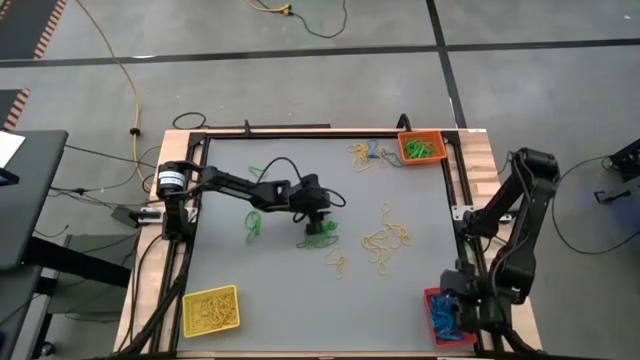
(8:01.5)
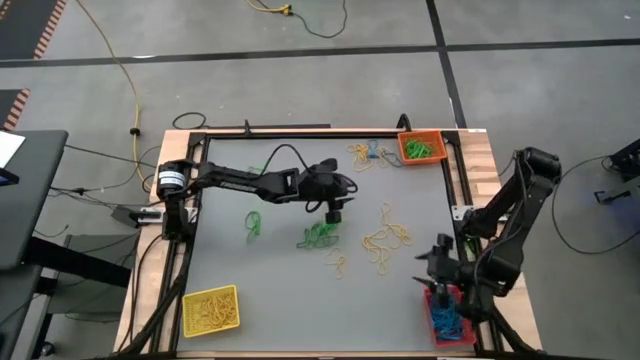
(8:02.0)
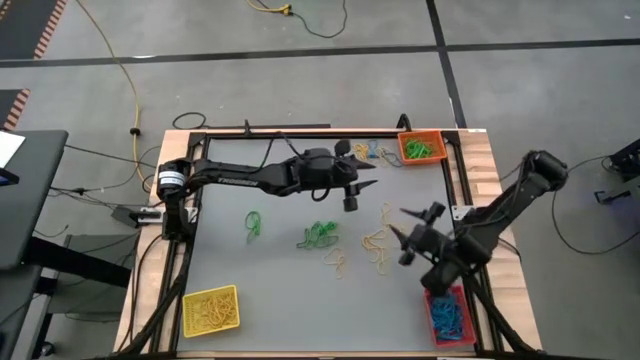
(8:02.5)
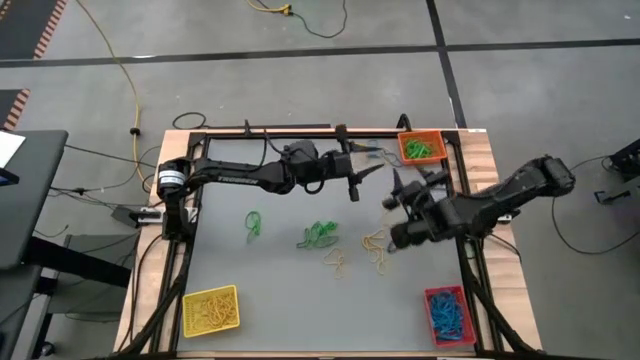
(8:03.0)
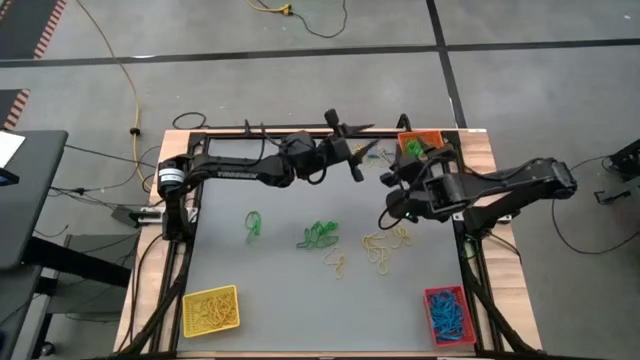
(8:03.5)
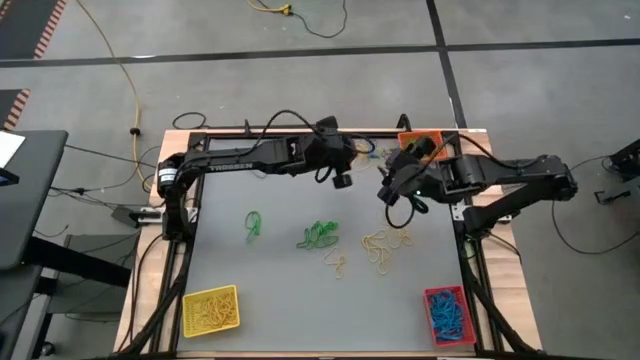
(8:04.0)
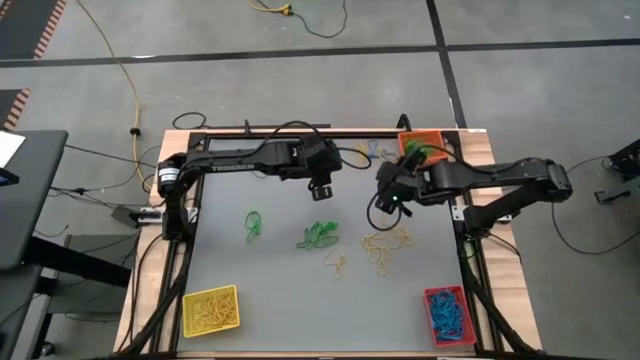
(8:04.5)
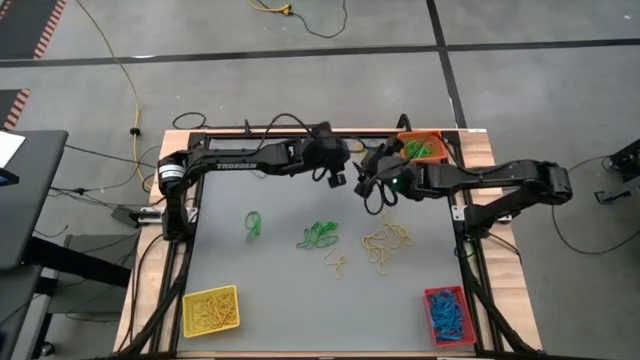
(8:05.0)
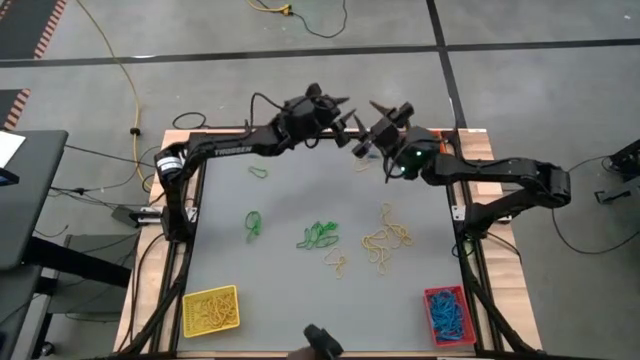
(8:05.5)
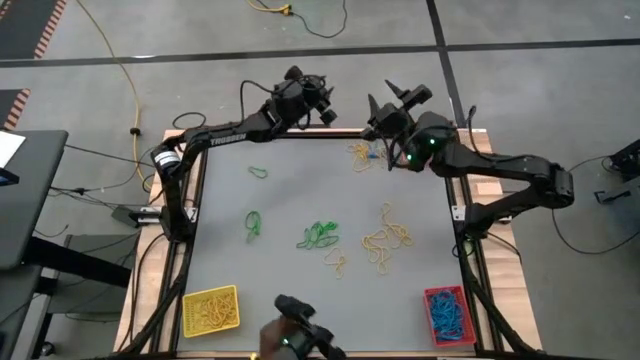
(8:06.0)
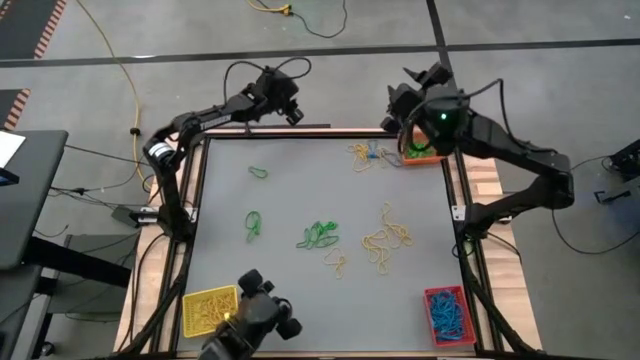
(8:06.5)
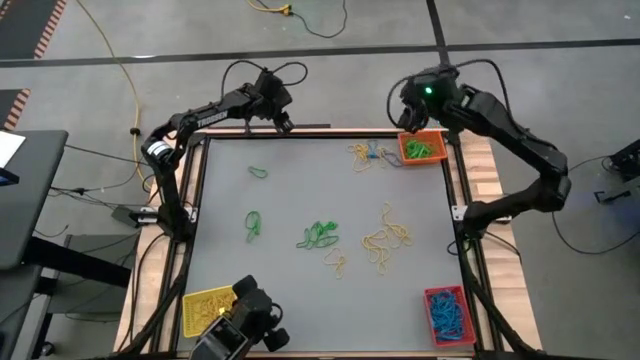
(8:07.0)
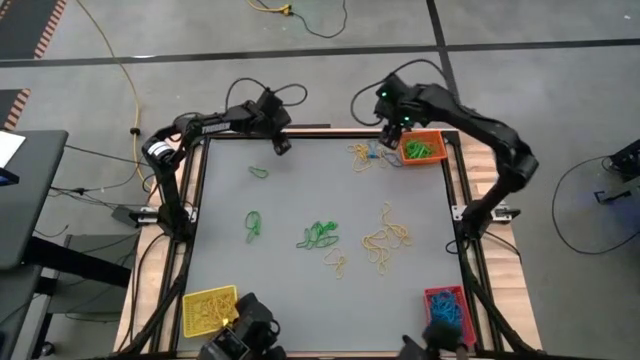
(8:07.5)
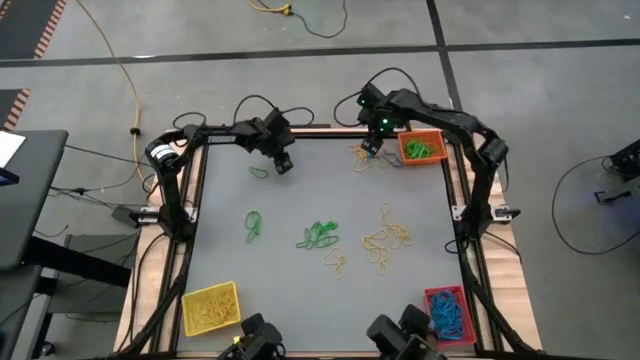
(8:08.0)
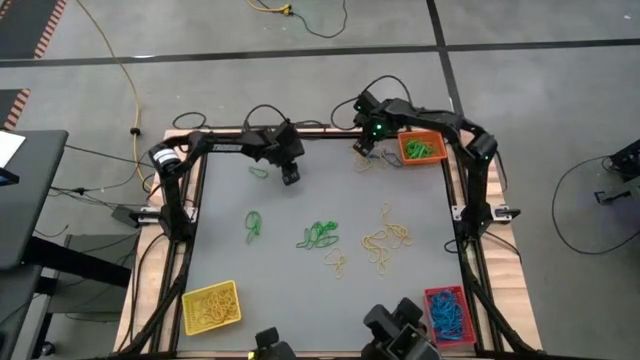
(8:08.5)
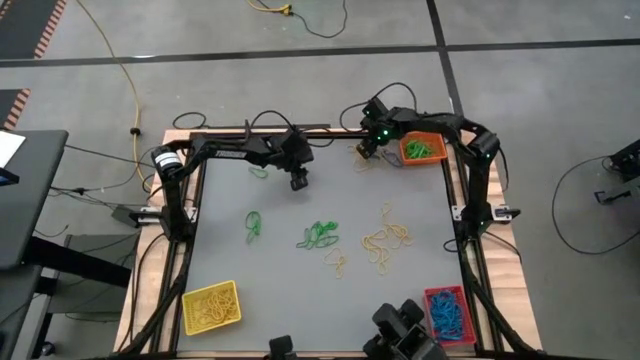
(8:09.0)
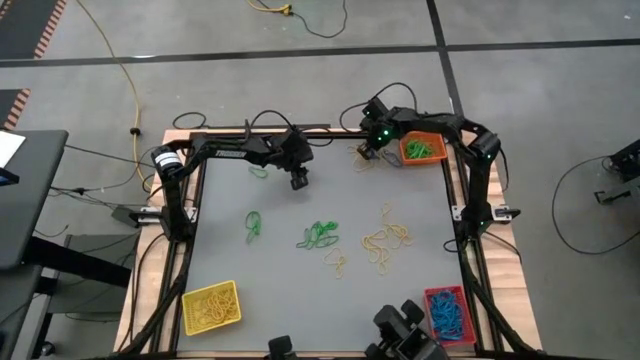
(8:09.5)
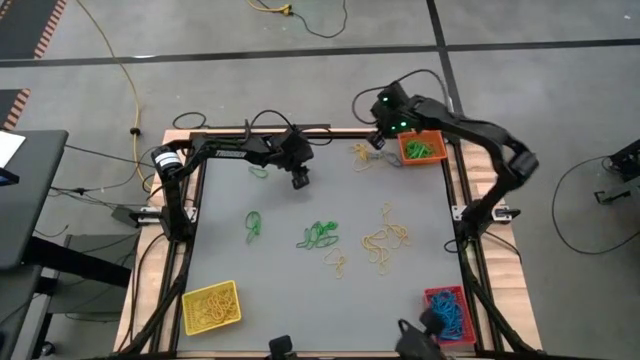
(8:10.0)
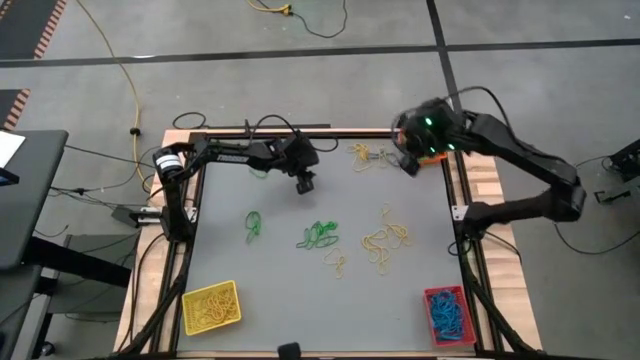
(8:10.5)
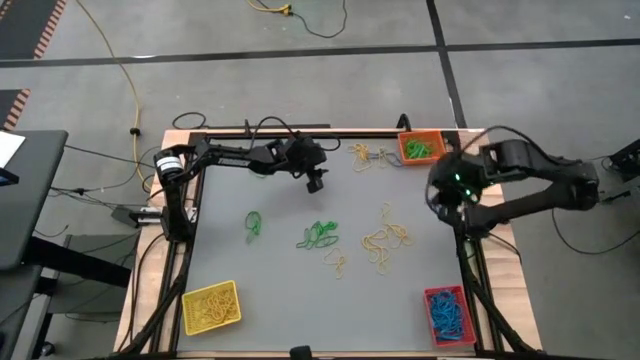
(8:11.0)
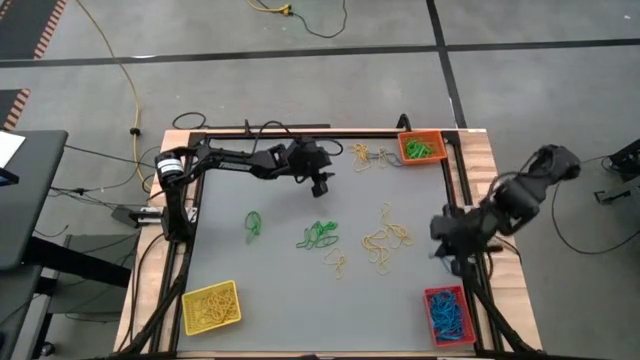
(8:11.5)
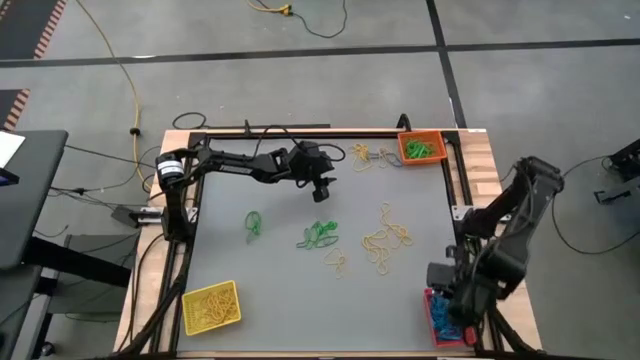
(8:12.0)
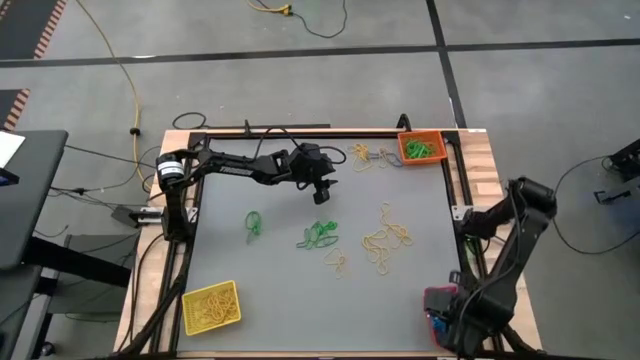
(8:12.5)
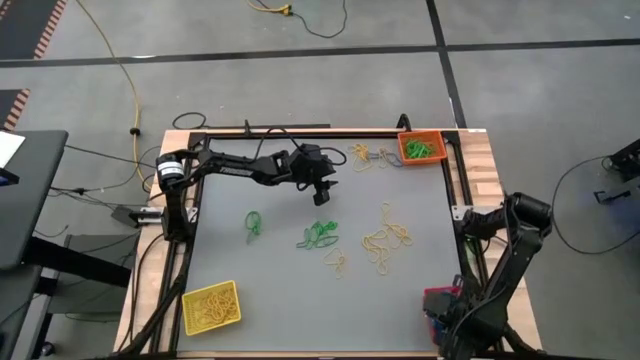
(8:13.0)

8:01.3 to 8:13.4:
Task: Sort rubber bands into baskets
Put the blue rubber band into the red bin

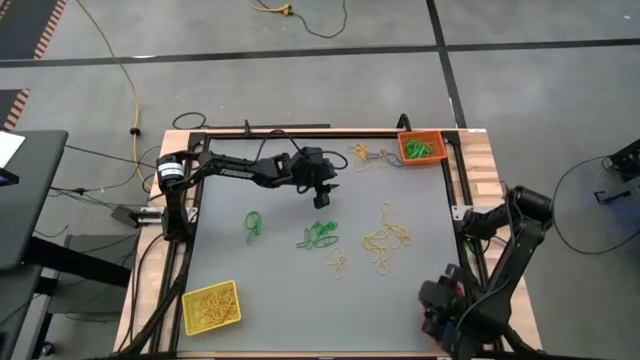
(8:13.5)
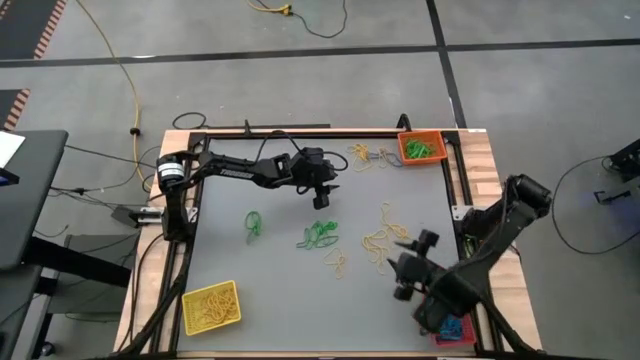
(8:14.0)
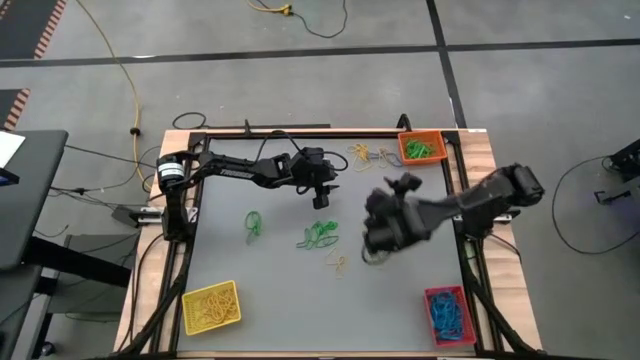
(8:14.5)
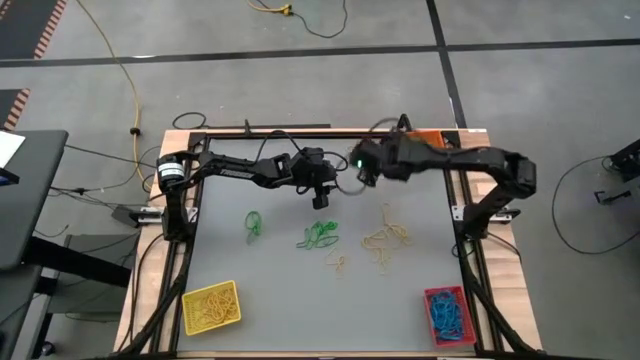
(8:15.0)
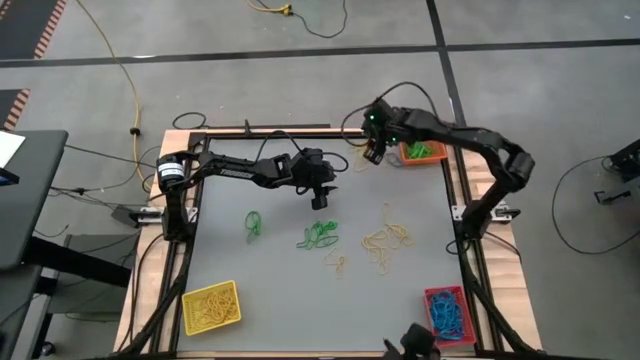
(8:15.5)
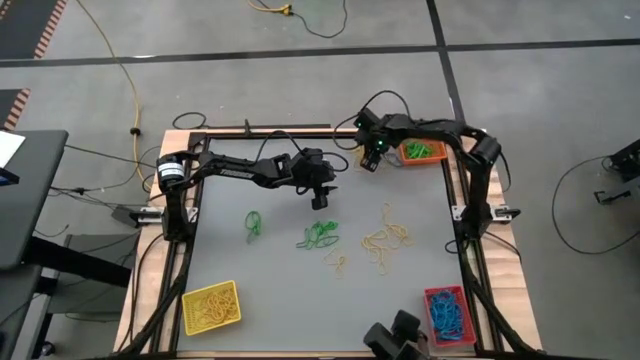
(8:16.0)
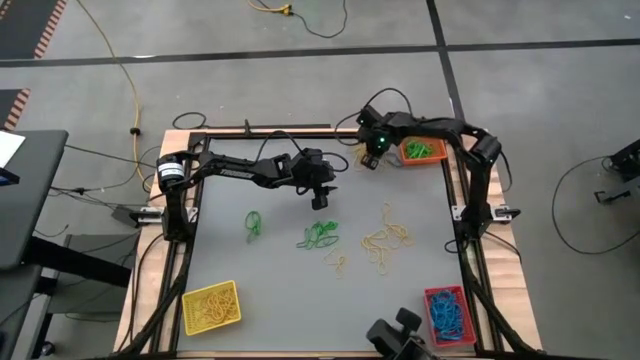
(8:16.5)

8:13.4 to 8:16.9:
Put the blue rubber band into the red bin

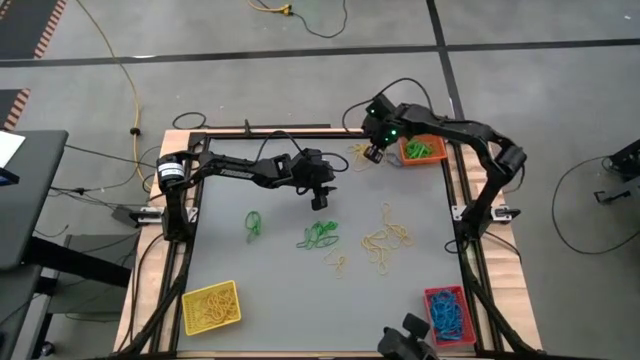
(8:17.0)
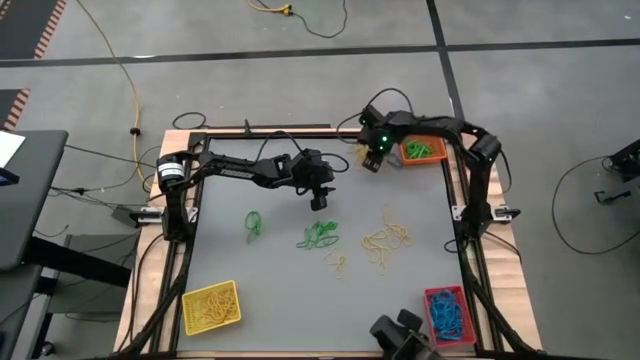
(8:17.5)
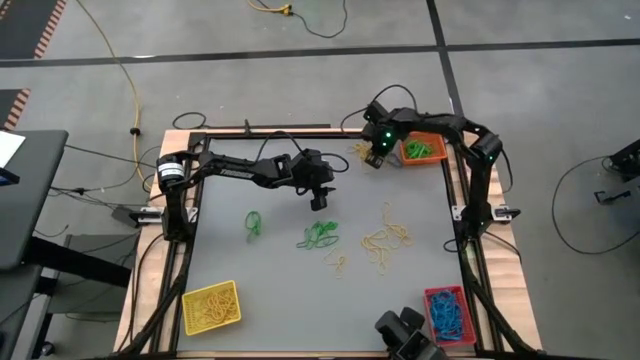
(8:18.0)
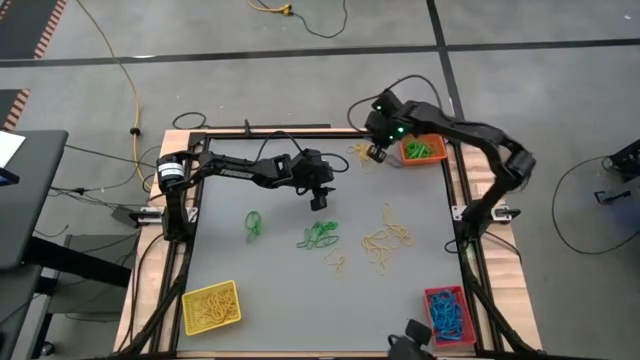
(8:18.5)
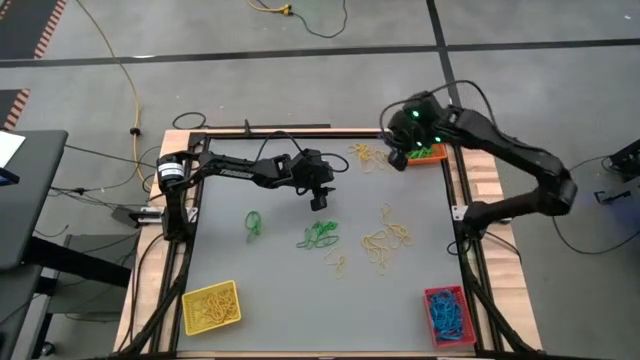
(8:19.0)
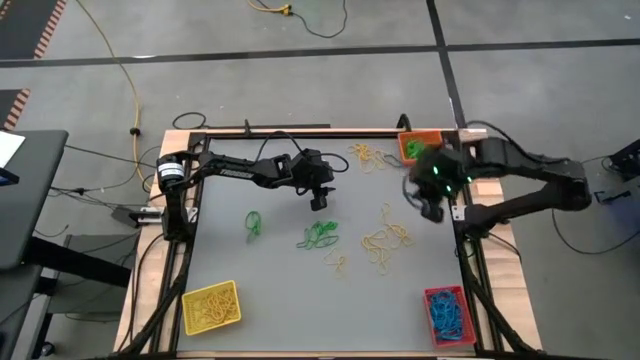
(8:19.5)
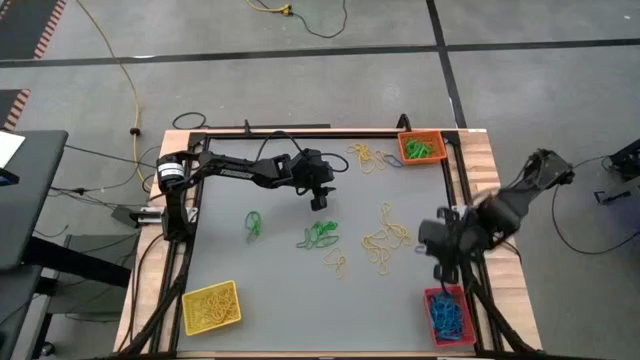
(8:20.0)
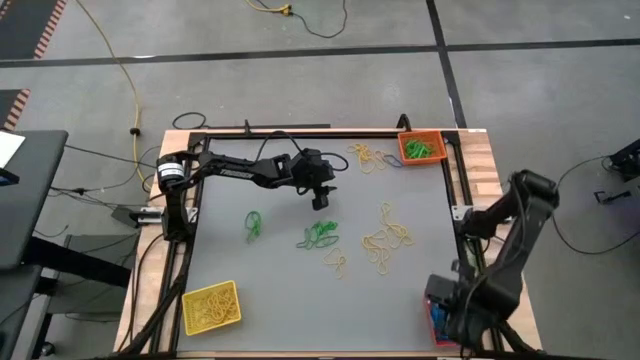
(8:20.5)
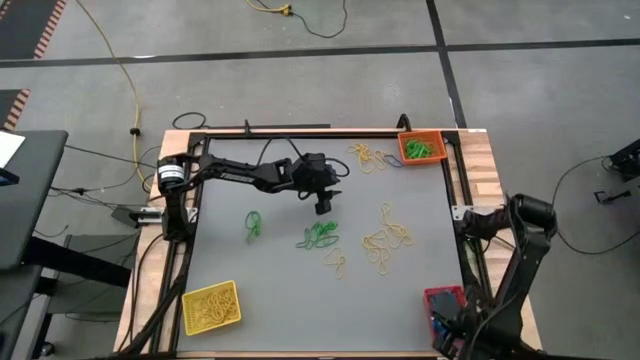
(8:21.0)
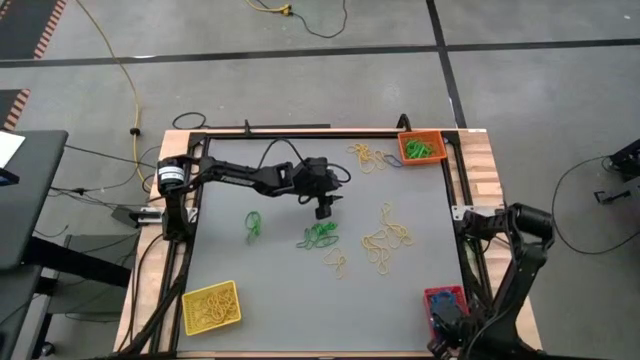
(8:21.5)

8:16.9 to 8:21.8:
Put the blue rubber band into the red bin
